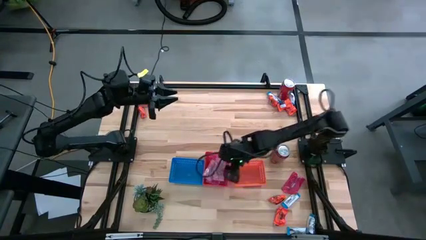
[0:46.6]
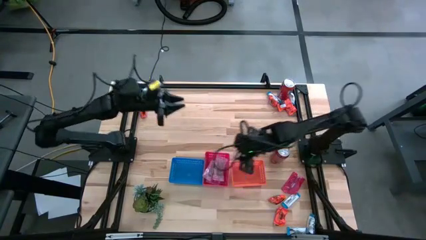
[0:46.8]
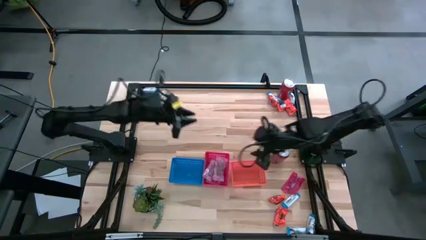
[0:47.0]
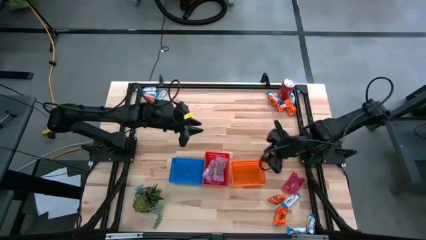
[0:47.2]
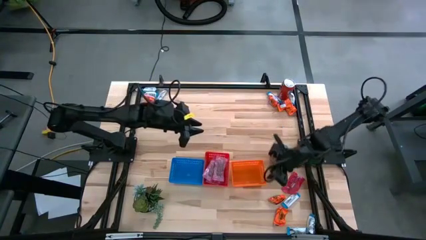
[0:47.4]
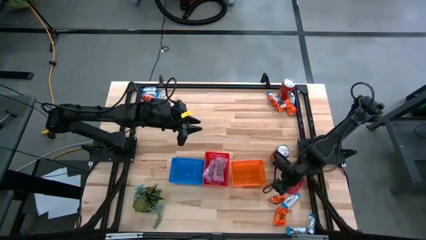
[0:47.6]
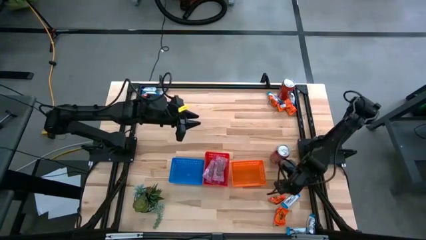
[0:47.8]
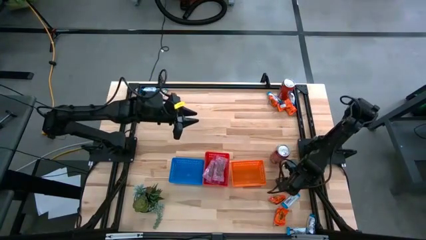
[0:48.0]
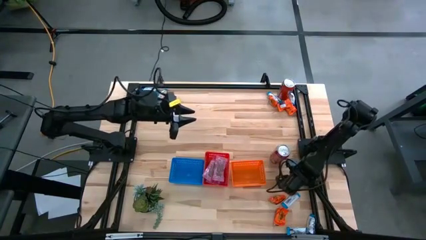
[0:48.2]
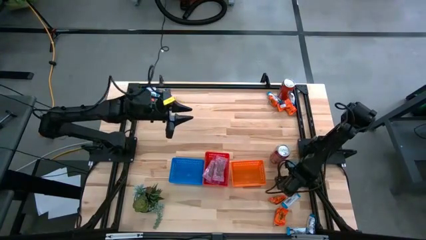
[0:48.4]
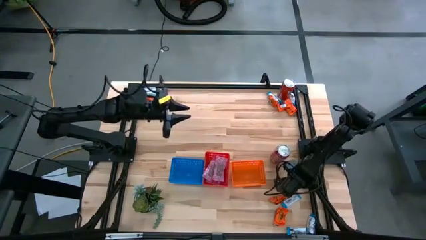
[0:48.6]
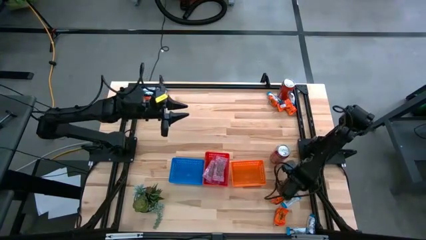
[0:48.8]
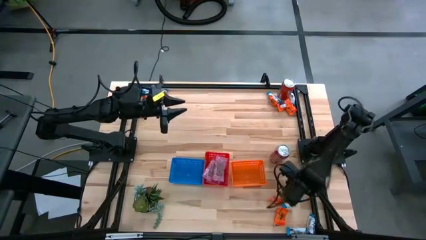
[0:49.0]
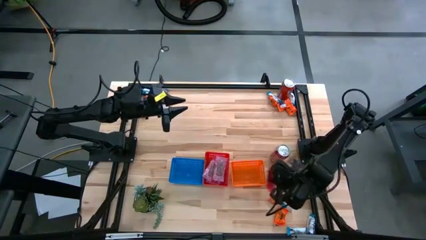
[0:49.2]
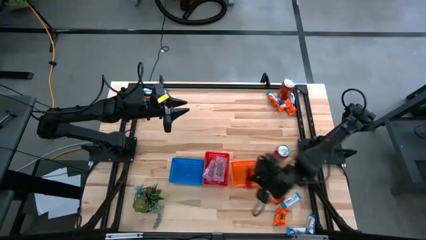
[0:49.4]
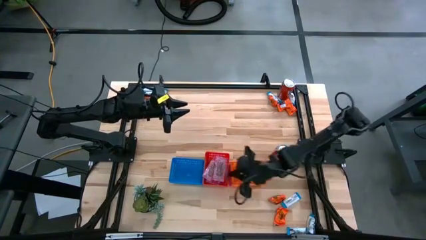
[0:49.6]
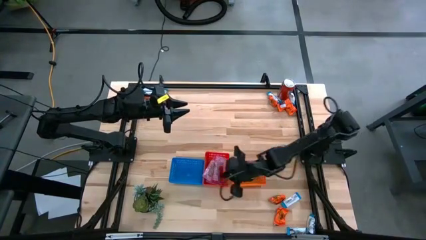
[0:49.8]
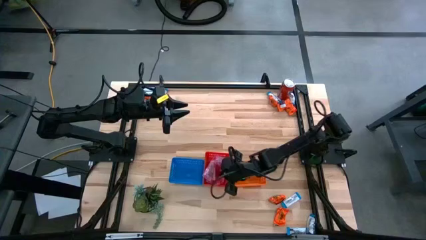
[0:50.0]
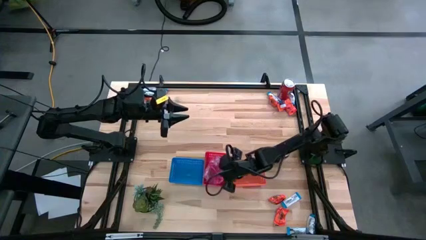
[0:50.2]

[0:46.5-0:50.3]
Task: Sort candy
Put the red candy pack into the red bin

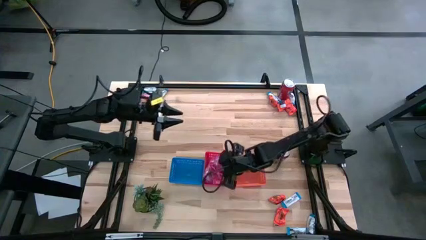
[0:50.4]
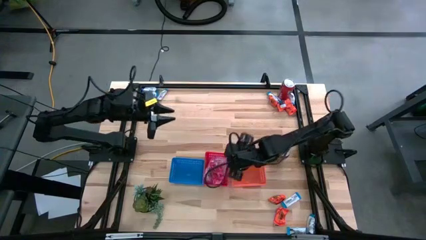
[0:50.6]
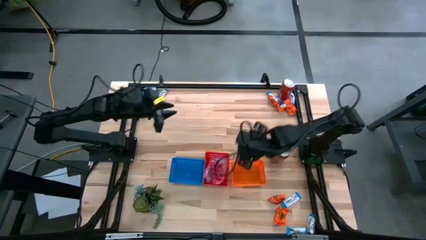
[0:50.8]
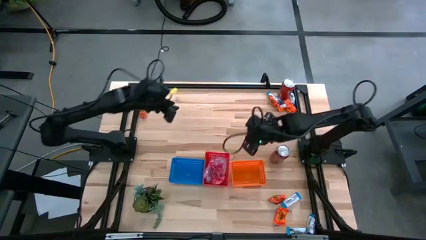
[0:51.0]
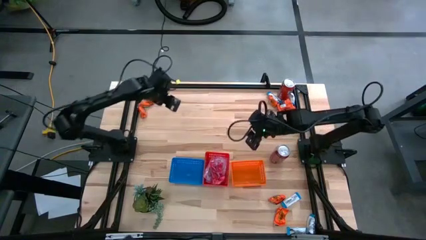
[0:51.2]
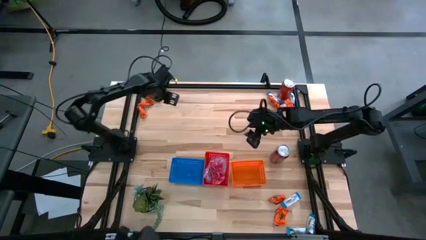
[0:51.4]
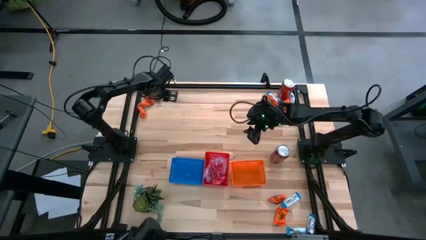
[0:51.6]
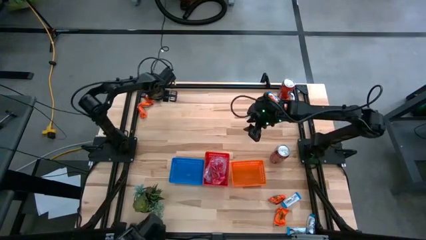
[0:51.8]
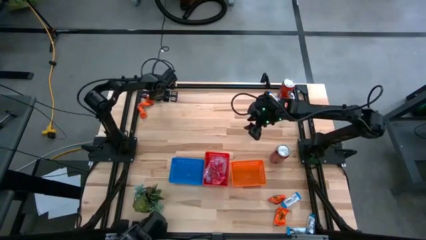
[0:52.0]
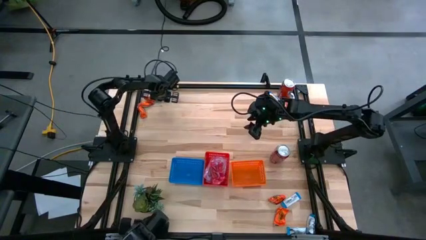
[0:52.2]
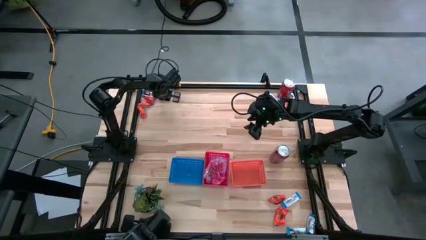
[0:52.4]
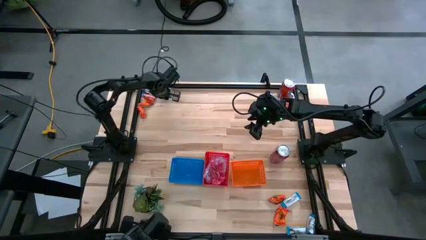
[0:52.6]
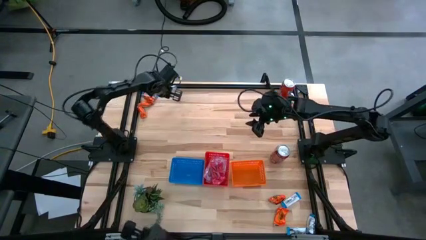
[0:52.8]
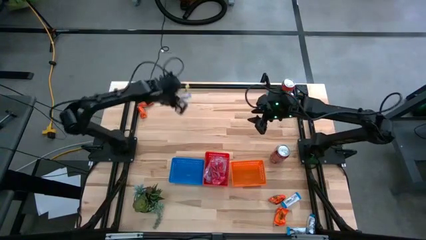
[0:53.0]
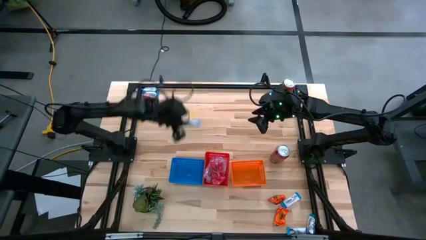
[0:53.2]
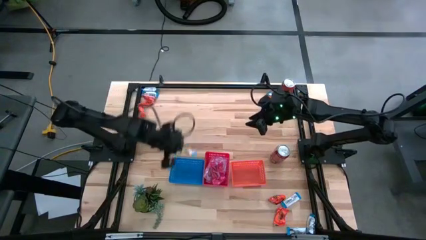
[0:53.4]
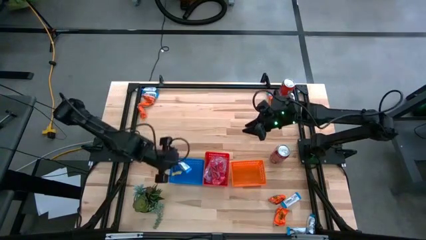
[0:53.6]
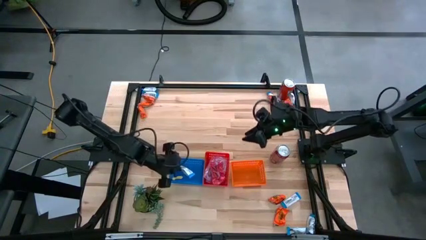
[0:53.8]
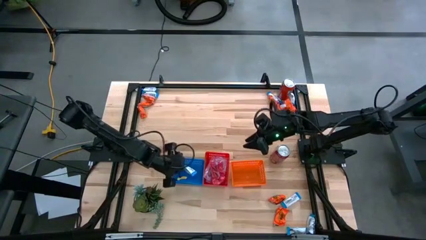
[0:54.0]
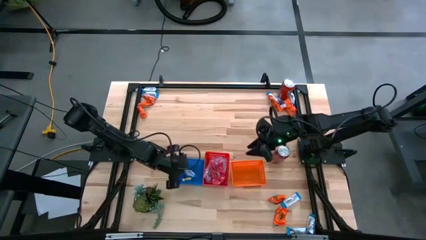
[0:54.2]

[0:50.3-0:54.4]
Put the white candy pack into the blue bin

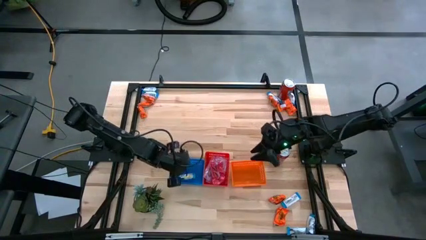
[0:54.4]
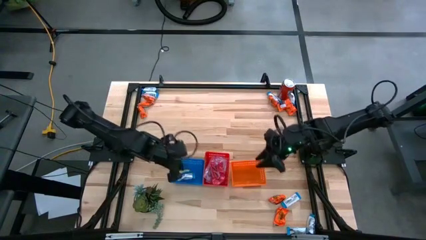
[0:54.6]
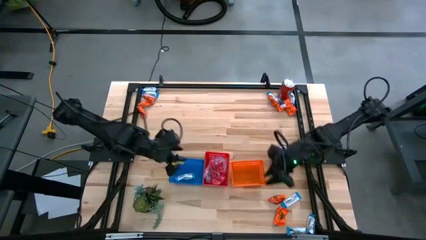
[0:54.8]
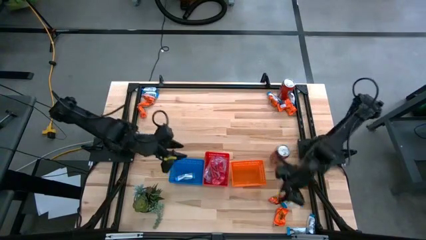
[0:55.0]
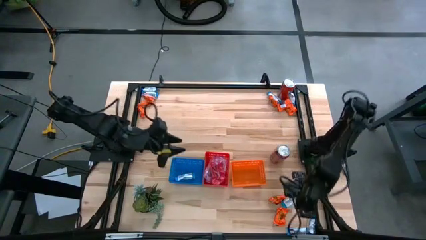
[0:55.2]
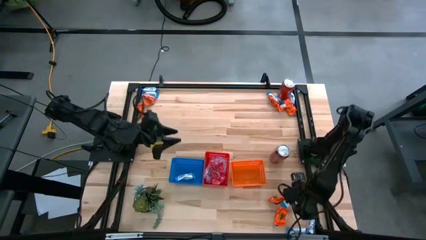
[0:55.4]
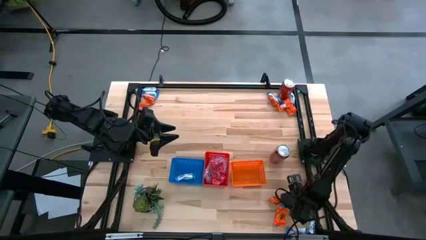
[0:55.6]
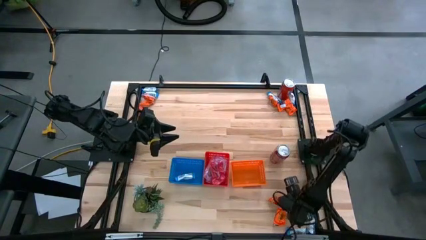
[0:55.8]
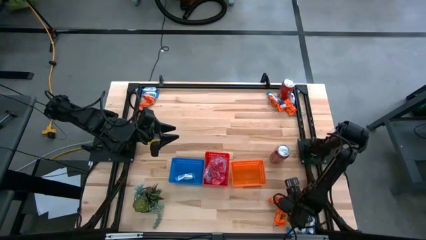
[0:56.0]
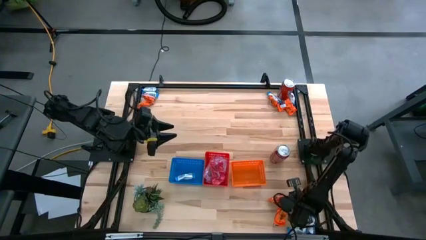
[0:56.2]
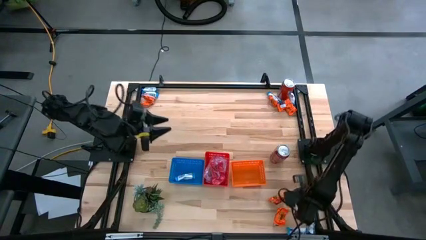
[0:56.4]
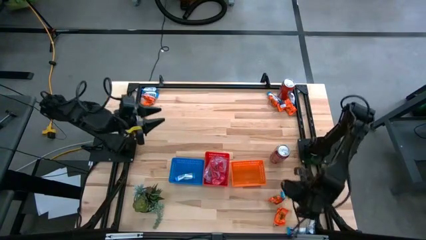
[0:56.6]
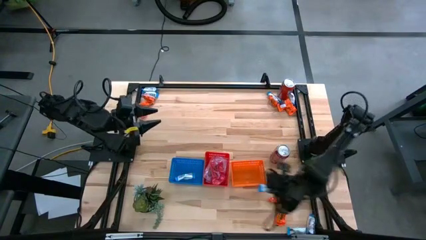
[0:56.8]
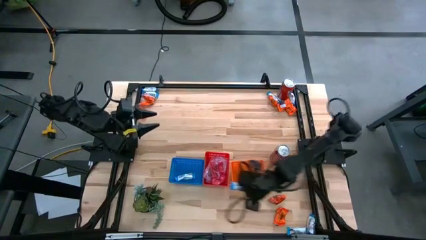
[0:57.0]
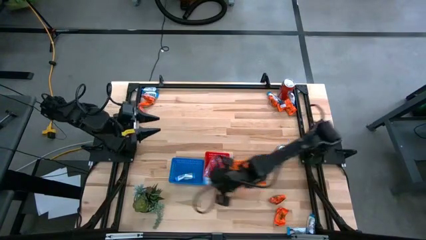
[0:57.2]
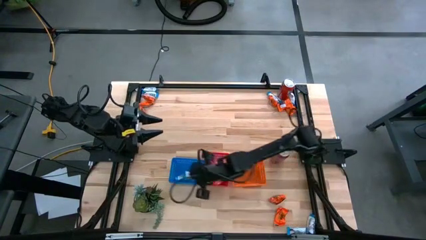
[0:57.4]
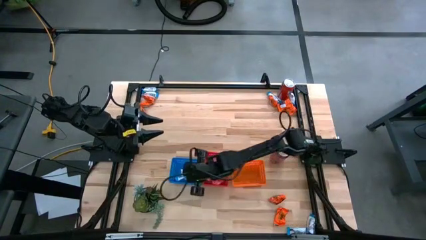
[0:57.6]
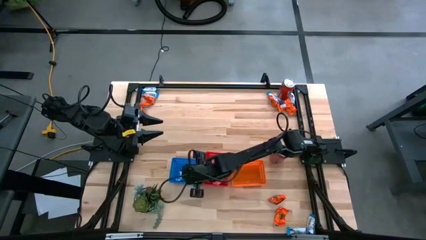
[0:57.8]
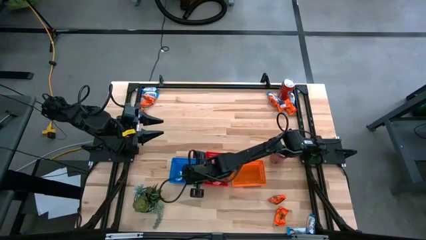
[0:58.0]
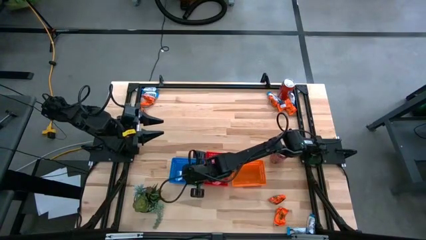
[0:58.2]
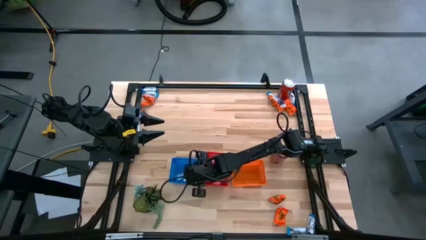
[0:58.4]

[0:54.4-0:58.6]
Put the white candy pack into the blue bin

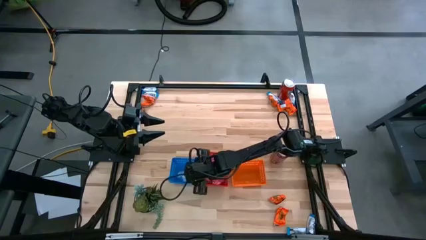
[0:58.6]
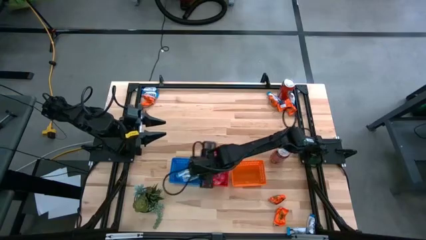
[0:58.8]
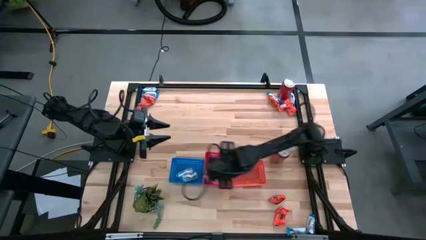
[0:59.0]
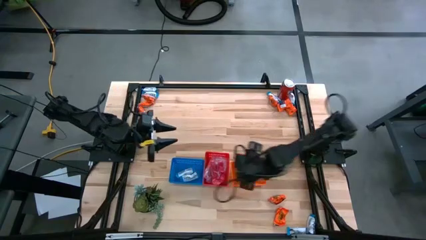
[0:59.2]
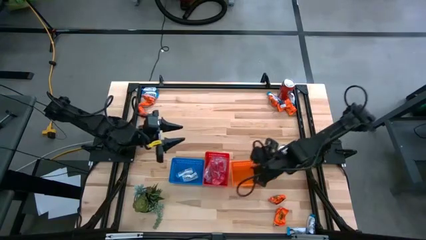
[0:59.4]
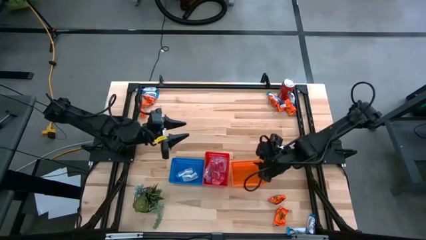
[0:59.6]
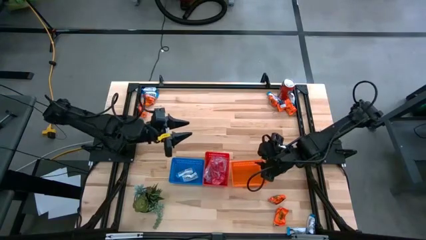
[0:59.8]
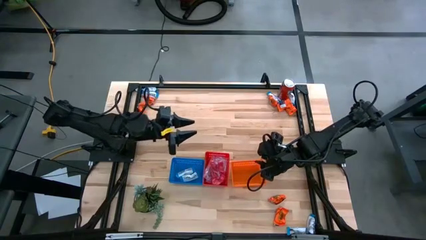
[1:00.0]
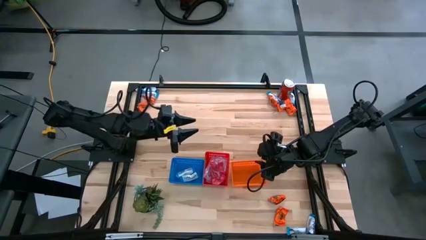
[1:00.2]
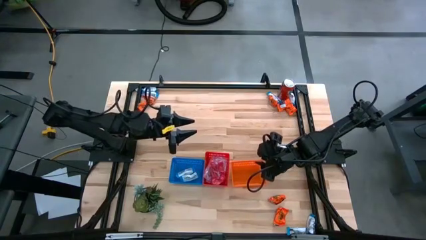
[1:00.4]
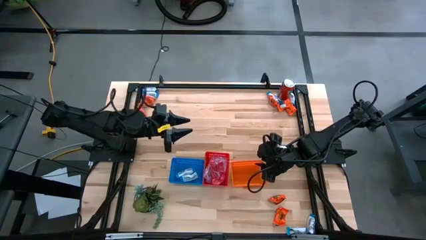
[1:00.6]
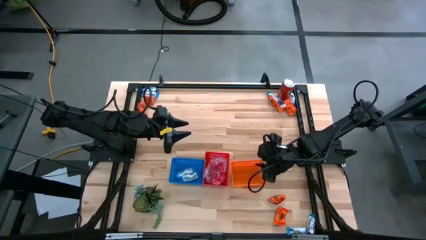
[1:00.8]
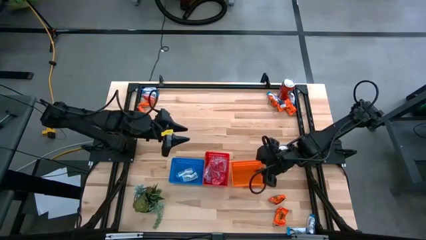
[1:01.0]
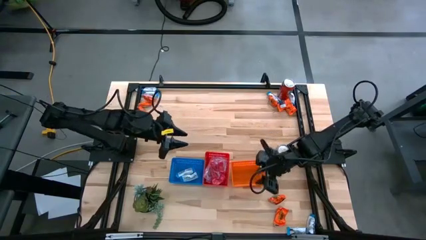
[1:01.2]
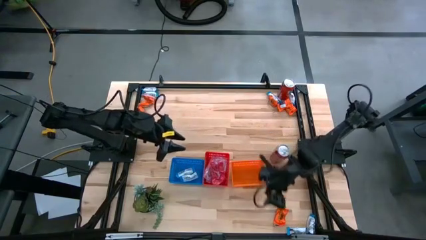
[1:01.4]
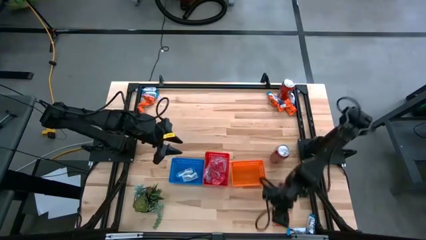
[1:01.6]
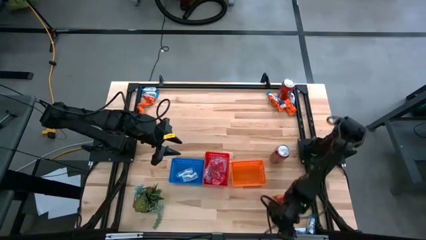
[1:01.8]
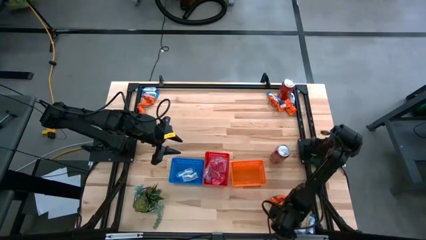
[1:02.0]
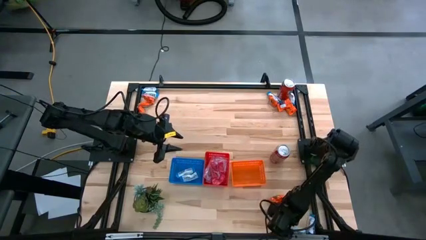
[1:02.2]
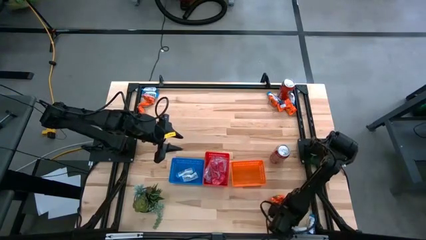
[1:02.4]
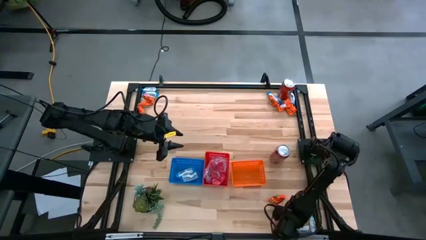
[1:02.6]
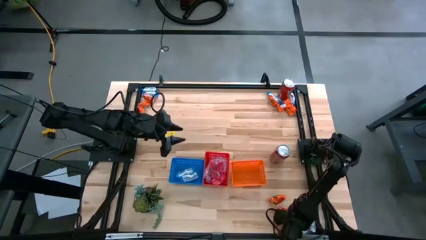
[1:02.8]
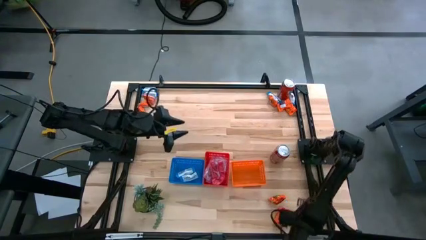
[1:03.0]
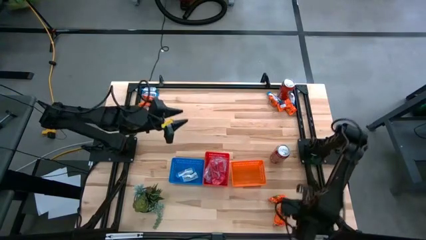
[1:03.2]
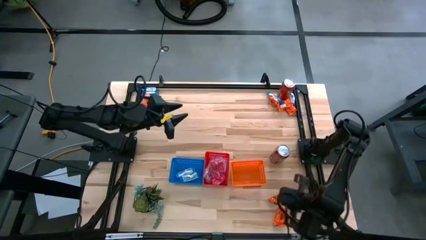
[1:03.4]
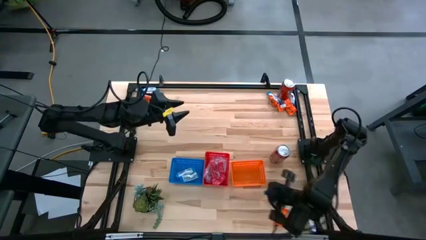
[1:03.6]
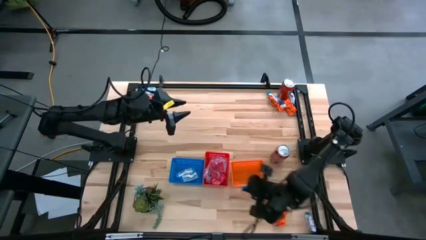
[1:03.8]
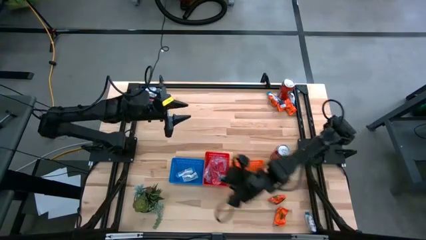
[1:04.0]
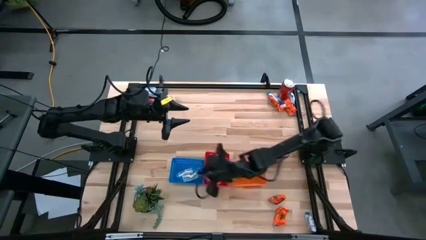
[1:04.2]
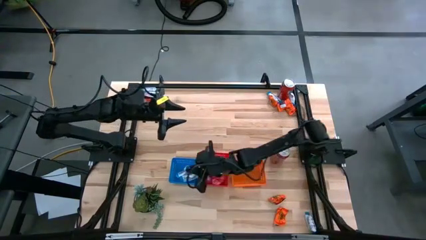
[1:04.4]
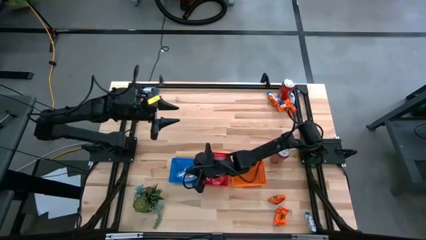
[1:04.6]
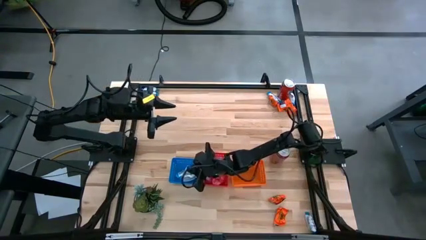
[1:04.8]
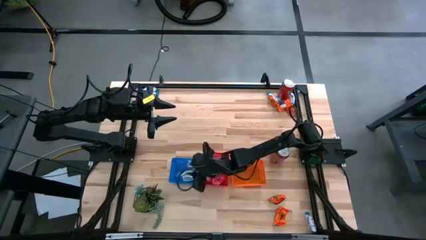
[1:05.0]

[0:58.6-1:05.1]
Put the white candy pack into the blue bin
